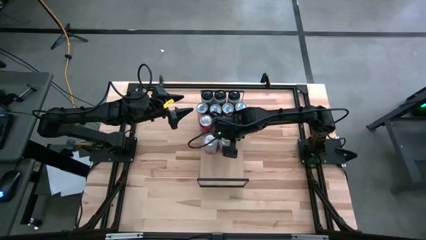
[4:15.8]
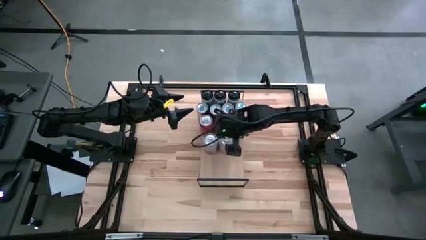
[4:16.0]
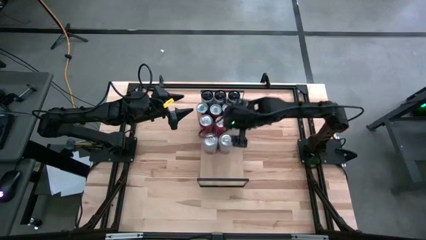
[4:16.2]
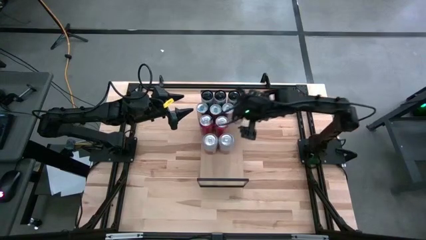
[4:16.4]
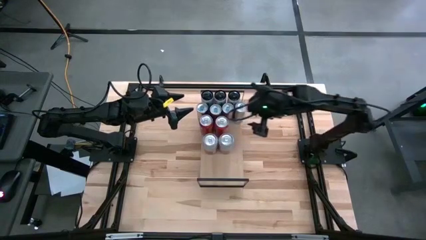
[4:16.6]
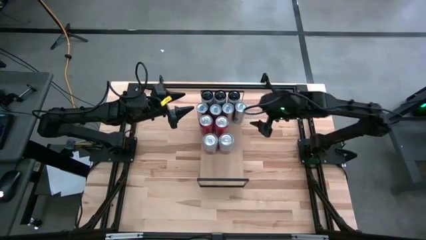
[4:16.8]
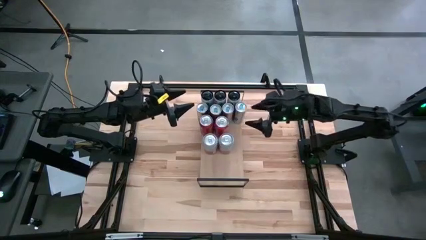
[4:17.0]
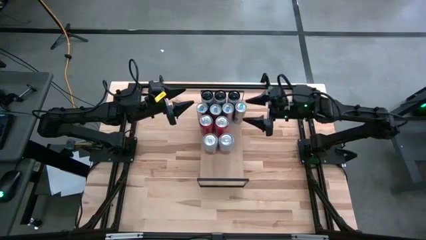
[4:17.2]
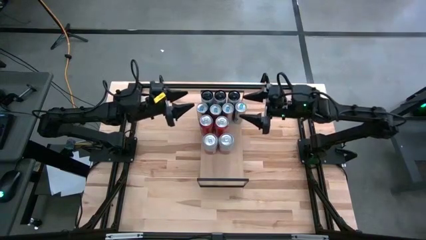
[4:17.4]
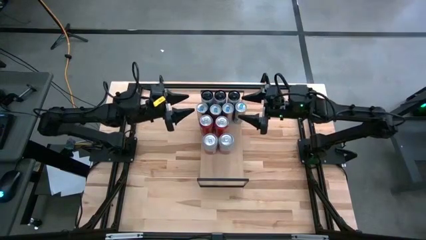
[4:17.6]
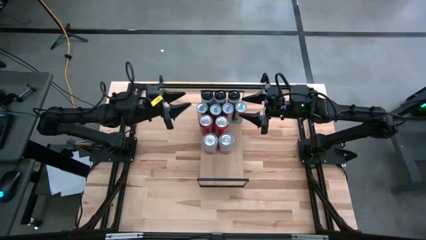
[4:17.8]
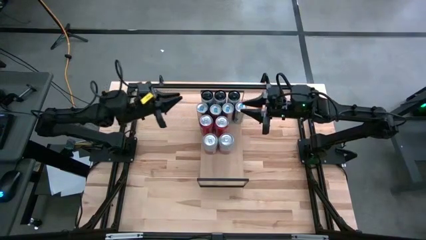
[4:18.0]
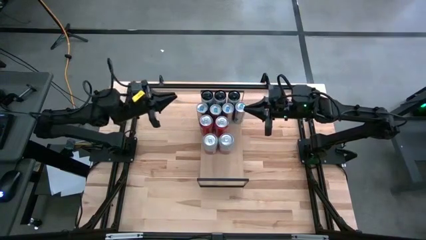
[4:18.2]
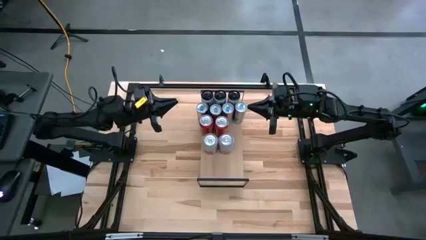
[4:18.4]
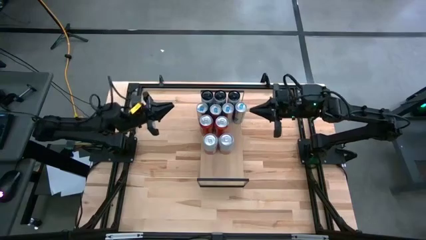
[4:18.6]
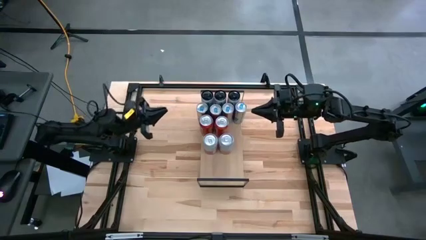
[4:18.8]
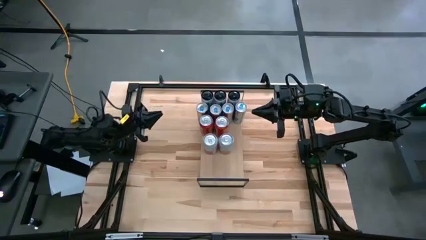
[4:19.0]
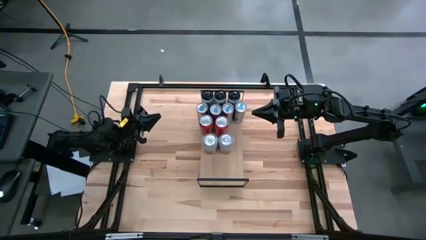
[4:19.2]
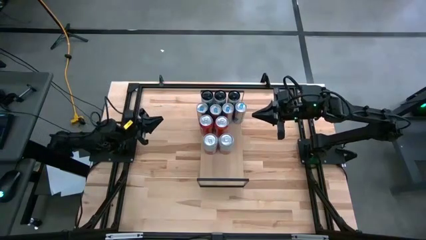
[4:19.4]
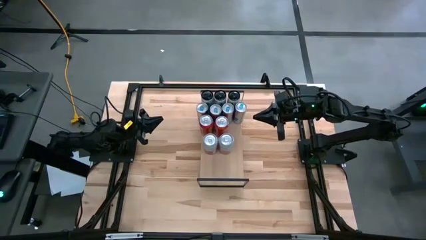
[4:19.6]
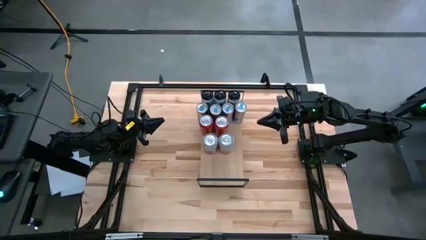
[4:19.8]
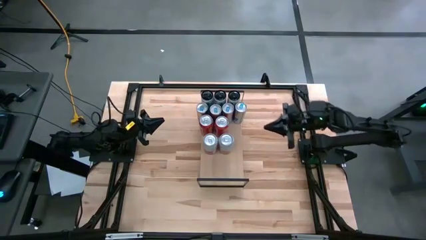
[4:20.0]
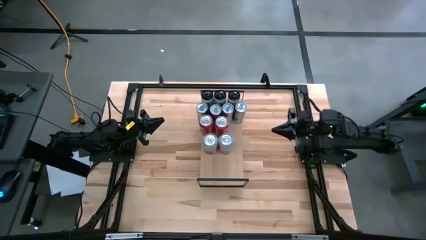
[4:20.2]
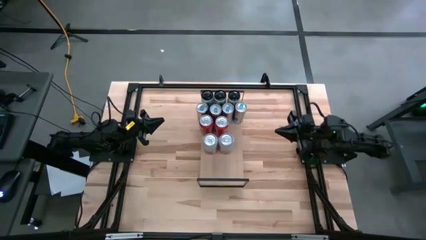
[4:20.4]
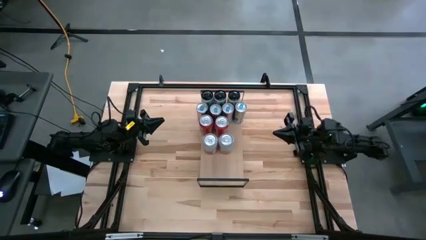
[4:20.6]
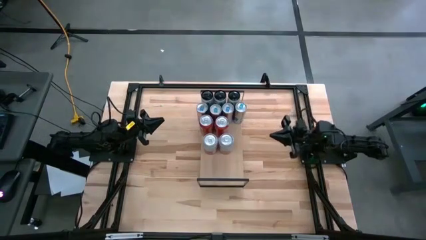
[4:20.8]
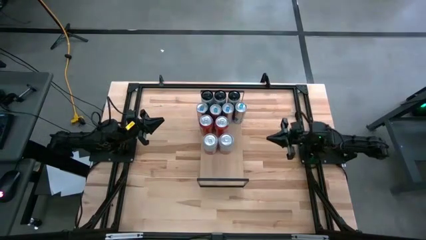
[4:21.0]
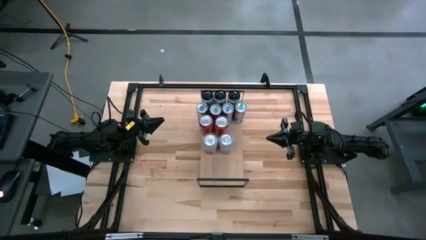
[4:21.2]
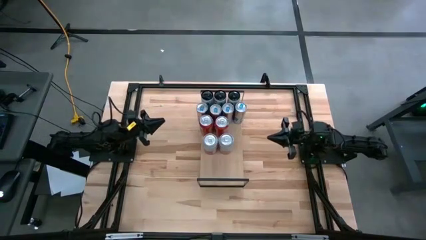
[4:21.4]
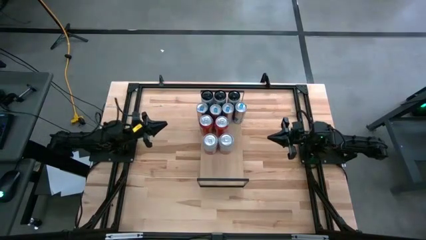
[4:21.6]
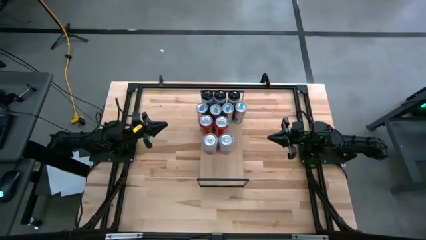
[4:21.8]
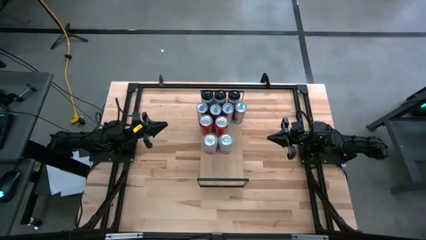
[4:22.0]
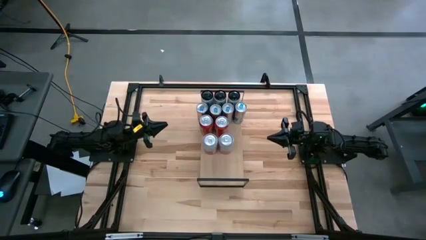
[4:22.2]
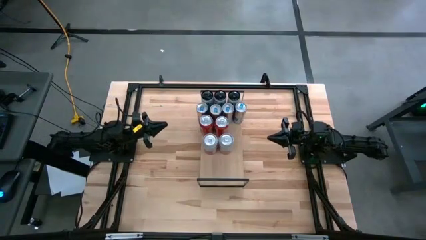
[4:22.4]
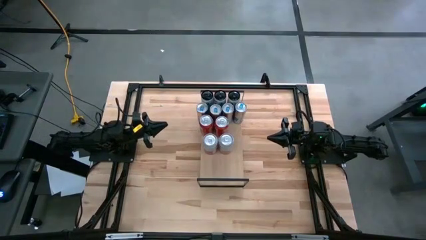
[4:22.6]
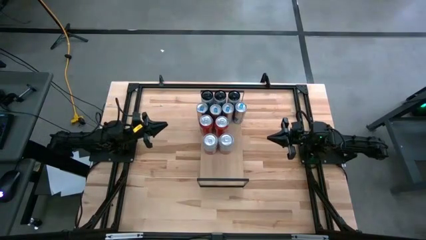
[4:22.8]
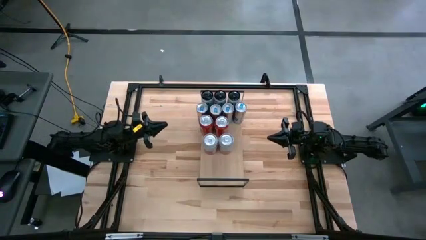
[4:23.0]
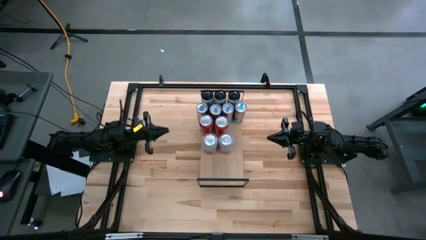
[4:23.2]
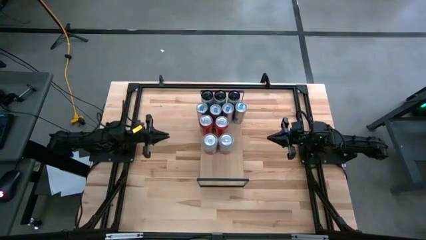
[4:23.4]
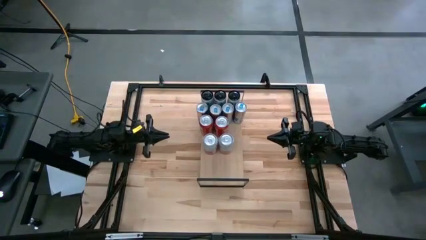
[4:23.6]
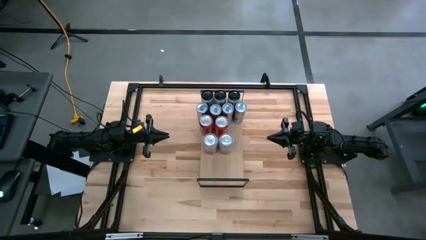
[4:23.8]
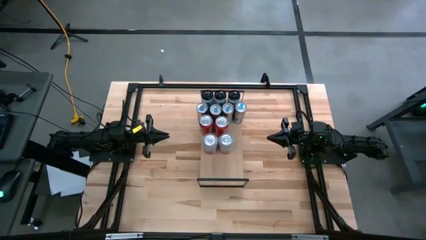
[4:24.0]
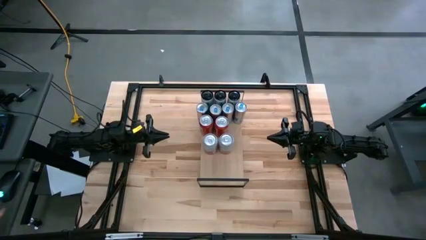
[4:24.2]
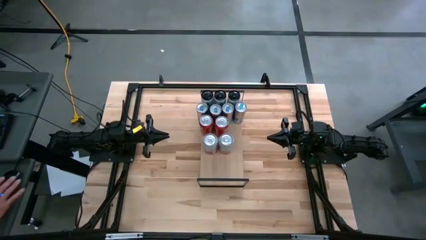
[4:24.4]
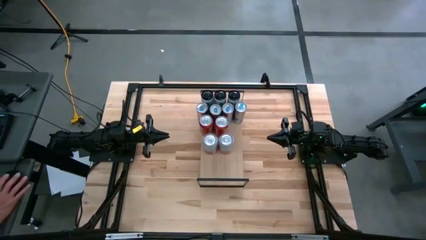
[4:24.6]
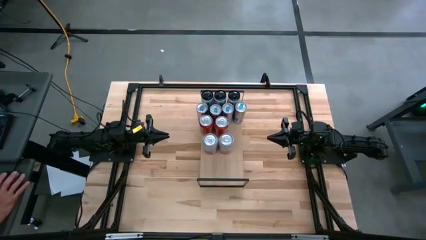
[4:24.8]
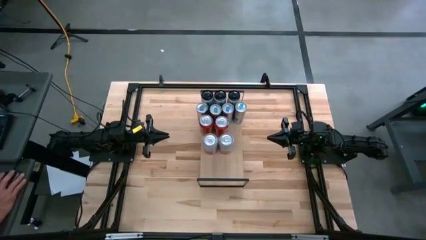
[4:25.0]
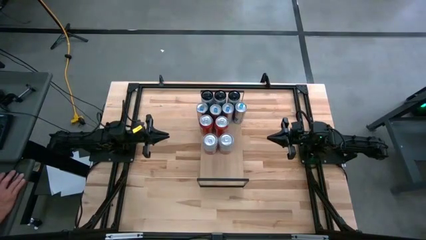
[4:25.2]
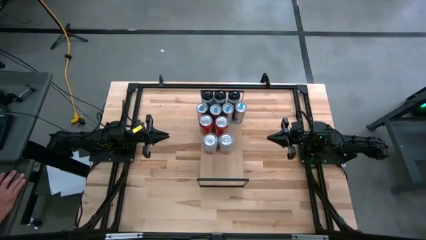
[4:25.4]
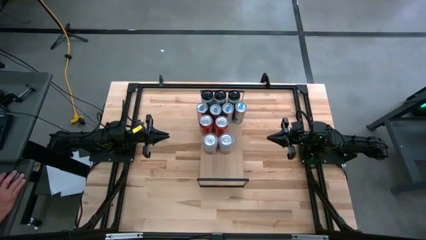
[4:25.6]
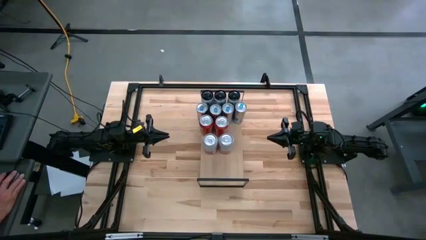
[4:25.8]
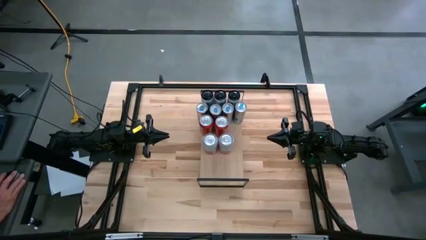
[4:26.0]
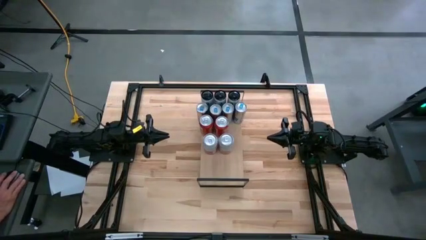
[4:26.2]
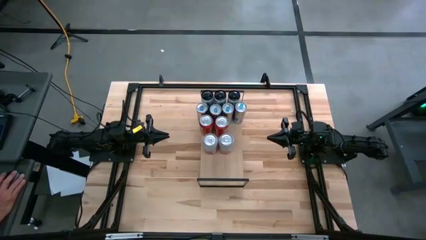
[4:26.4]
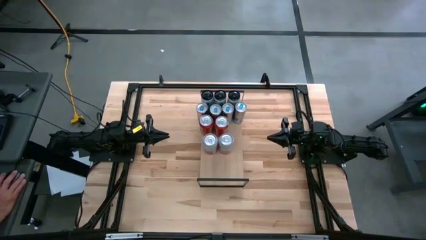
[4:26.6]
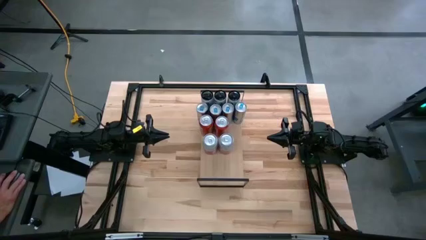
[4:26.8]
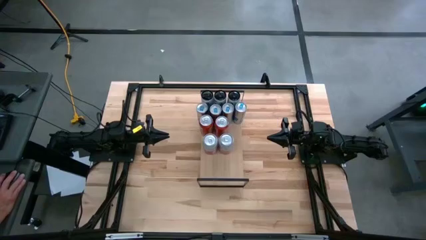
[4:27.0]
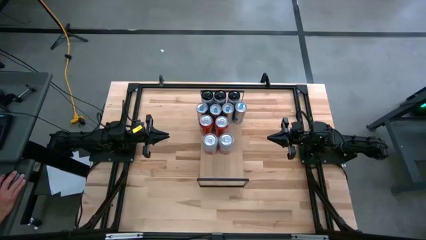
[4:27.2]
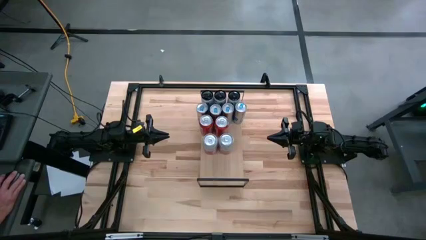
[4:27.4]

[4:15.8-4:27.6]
Task: Place canned beverage on shelf
Return to Home Position

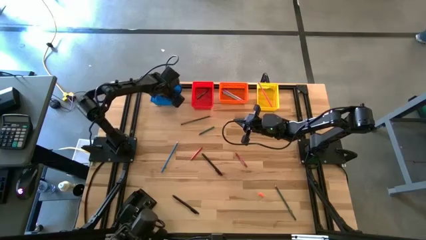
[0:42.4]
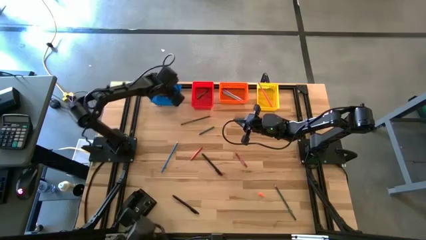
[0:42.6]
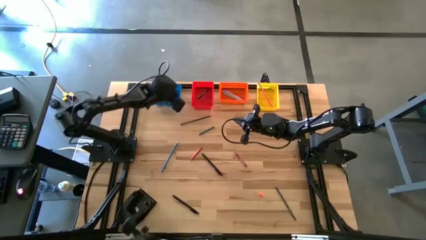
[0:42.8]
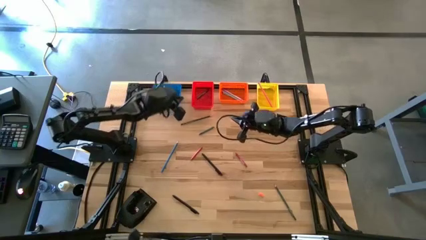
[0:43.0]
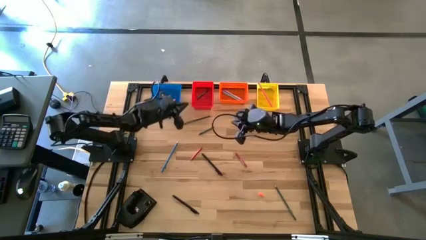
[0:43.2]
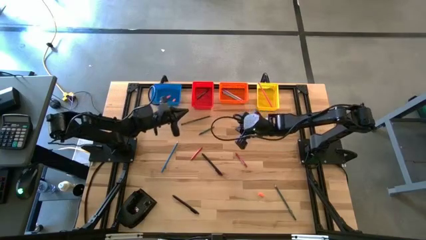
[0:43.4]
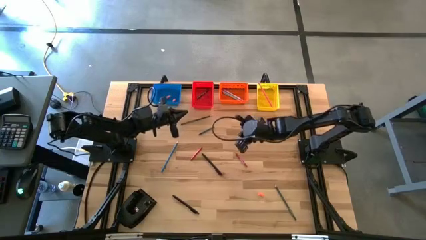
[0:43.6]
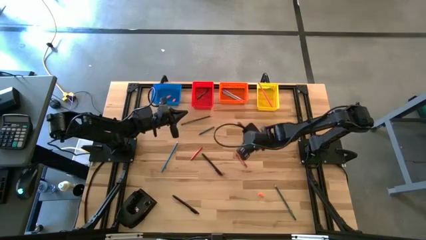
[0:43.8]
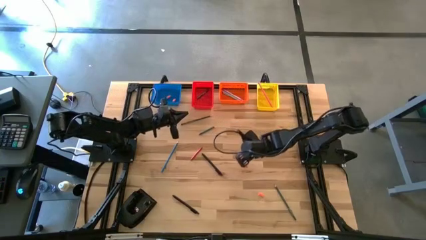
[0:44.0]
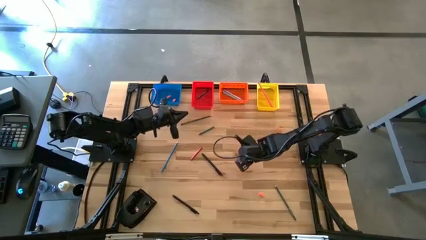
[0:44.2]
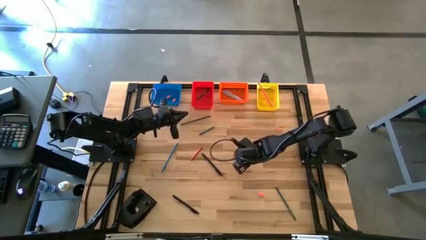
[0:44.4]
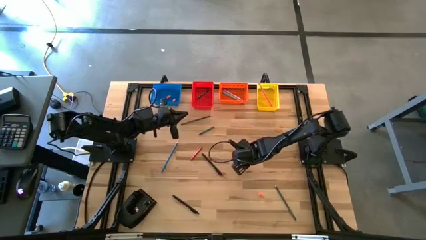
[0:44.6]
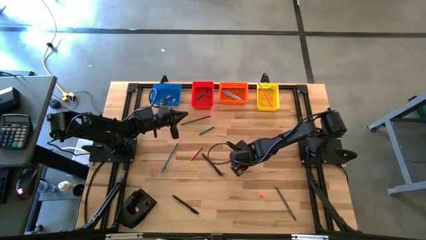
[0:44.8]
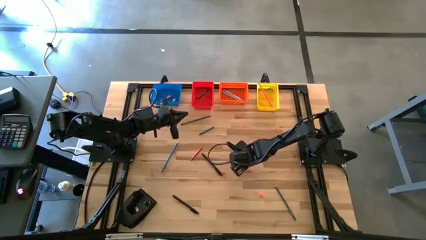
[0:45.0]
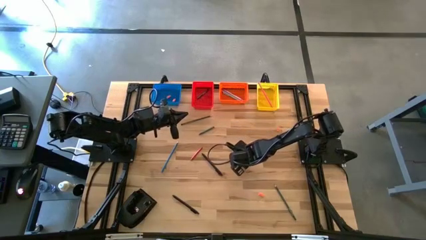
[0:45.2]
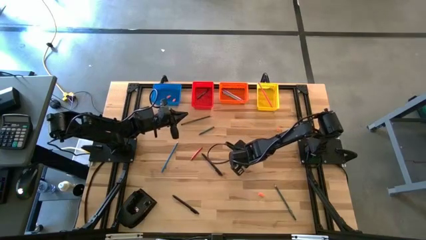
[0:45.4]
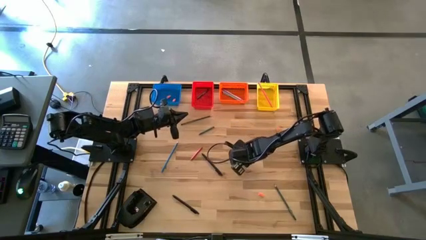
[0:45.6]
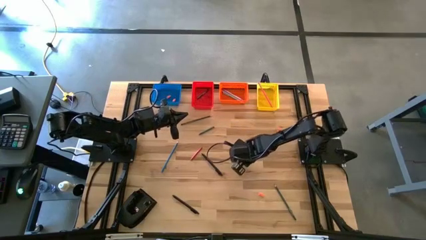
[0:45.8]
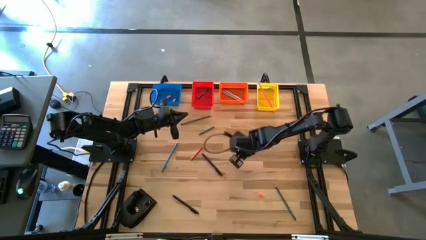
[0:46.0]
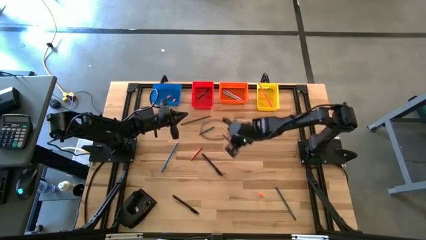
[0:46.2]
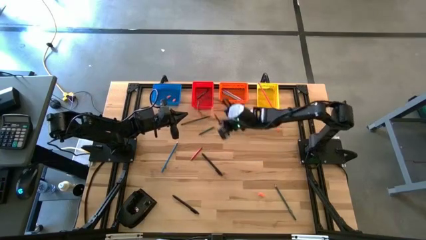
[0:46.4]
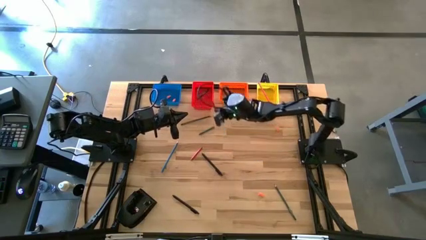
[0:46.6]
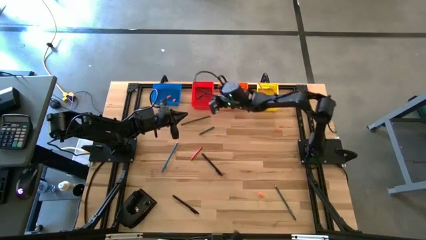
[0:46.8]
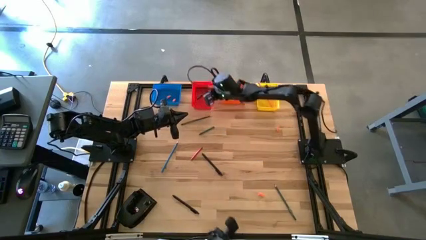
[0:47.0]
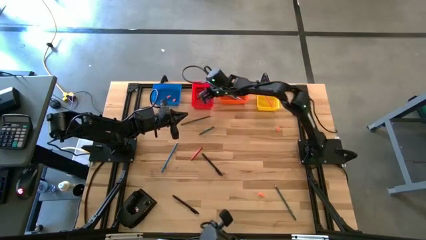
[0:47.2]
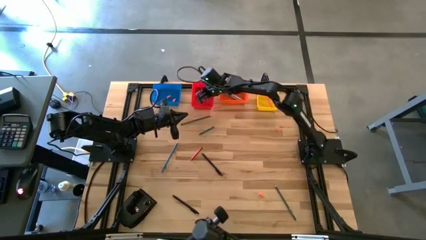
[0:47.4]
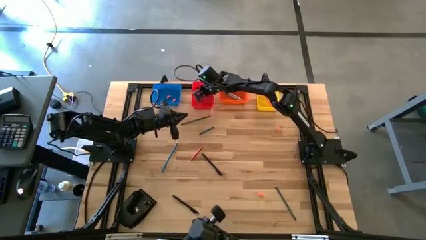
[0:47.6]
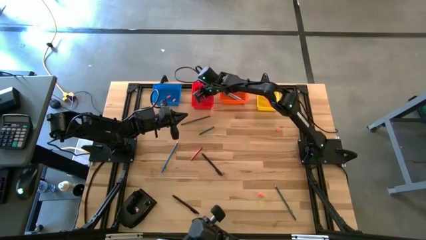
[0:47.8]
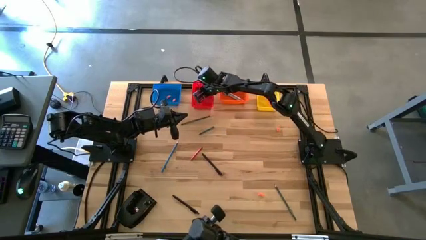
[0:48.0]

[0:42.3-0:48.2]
Task: Sort crayons/erasers/pens/pencils in bins
Put the red crayon into the red bin
